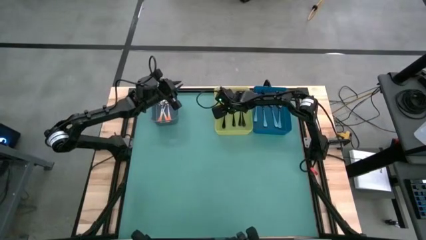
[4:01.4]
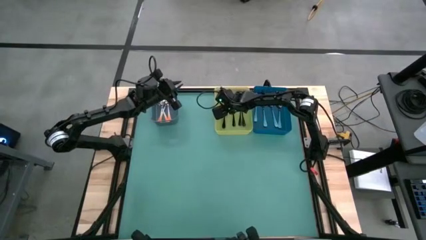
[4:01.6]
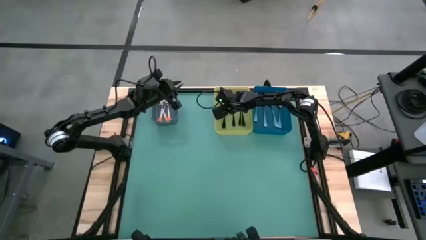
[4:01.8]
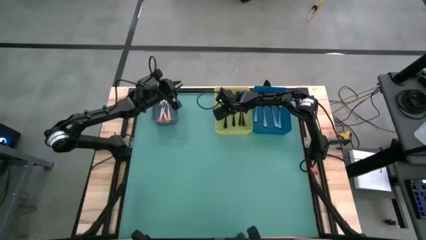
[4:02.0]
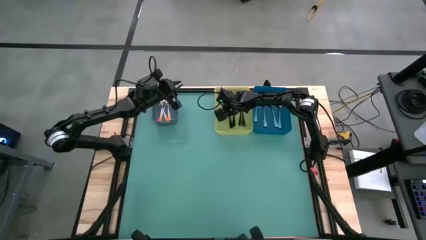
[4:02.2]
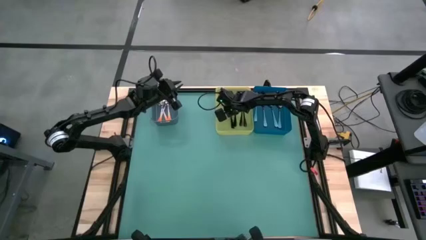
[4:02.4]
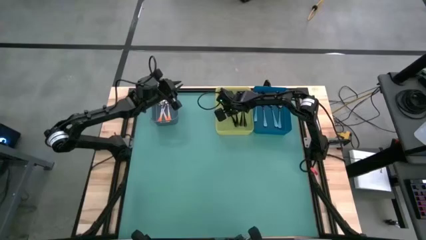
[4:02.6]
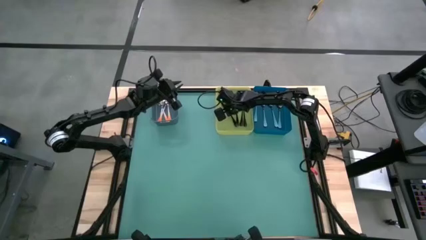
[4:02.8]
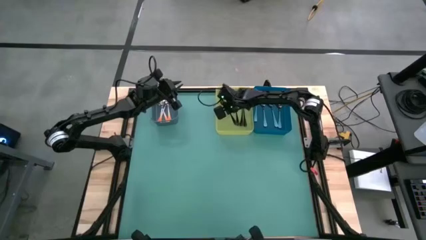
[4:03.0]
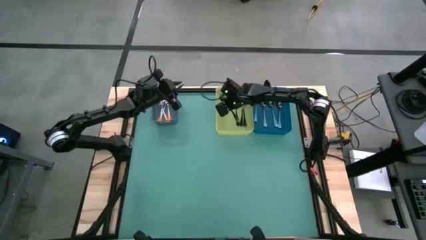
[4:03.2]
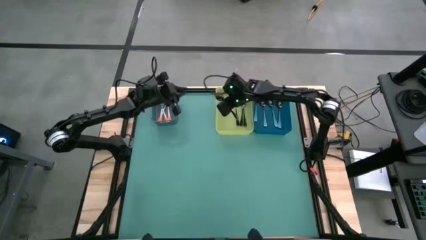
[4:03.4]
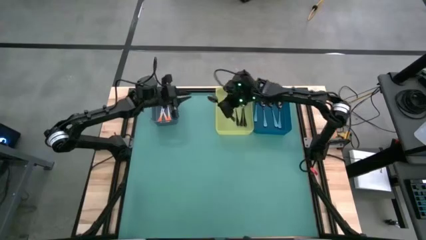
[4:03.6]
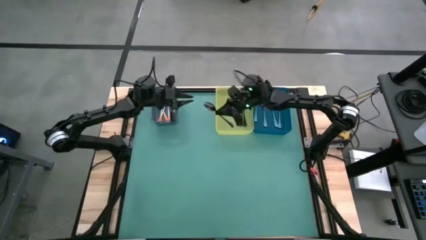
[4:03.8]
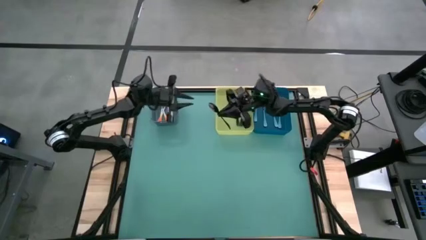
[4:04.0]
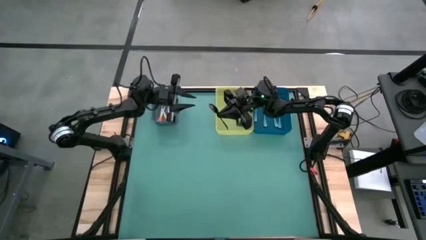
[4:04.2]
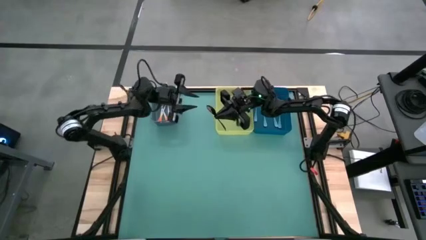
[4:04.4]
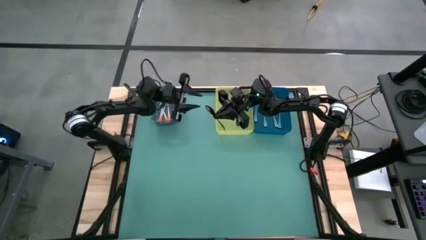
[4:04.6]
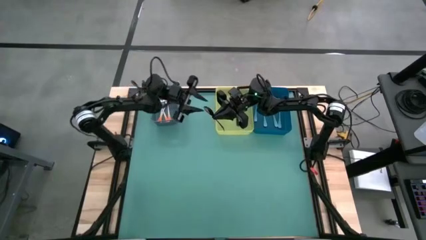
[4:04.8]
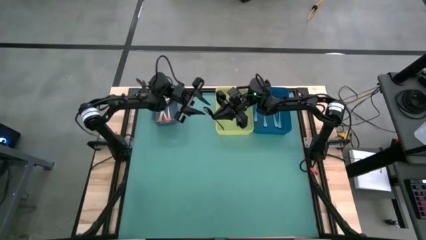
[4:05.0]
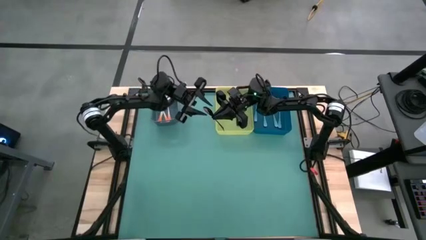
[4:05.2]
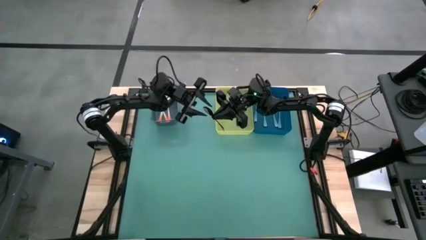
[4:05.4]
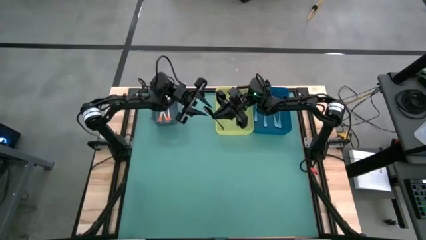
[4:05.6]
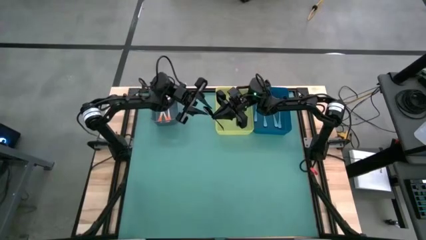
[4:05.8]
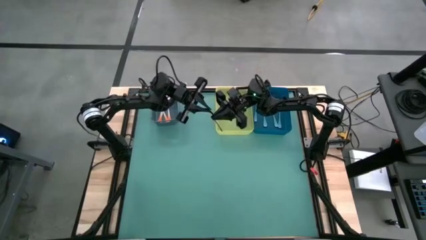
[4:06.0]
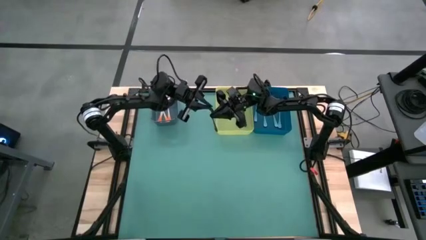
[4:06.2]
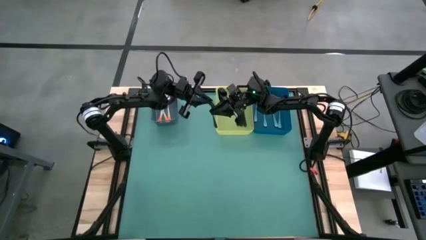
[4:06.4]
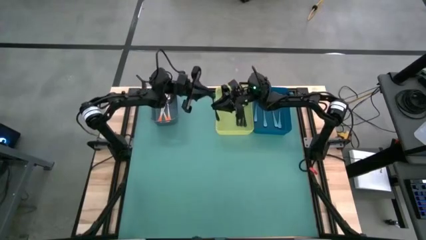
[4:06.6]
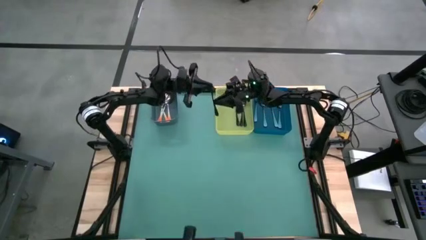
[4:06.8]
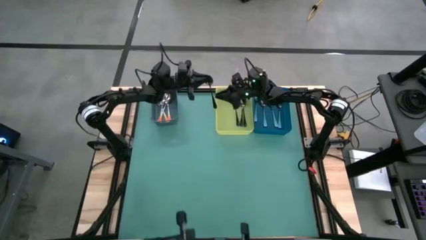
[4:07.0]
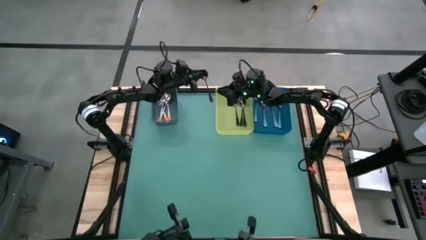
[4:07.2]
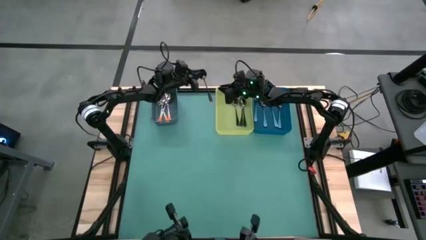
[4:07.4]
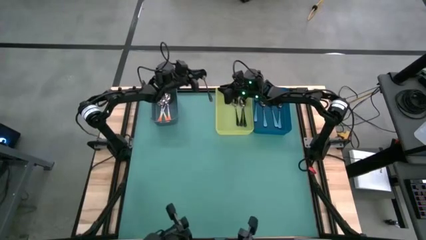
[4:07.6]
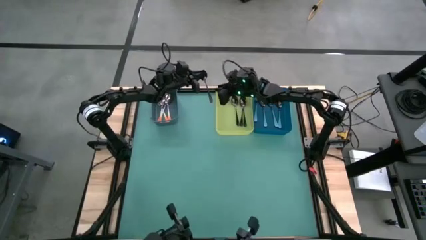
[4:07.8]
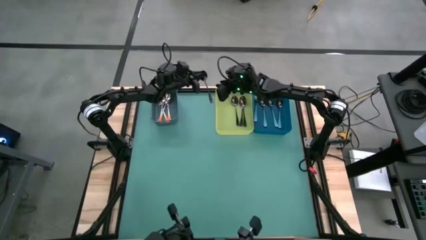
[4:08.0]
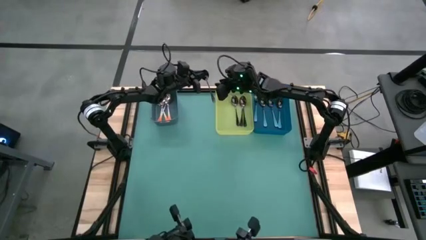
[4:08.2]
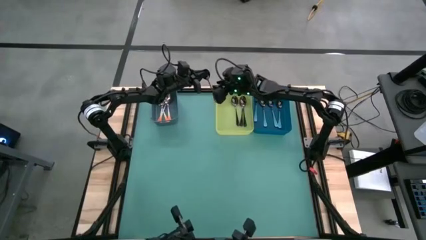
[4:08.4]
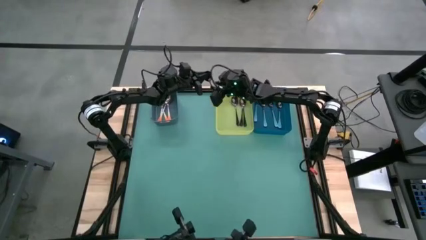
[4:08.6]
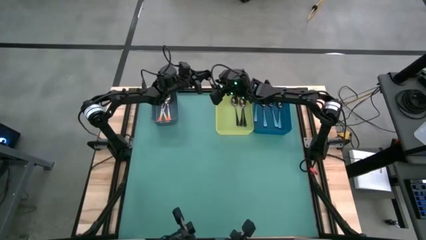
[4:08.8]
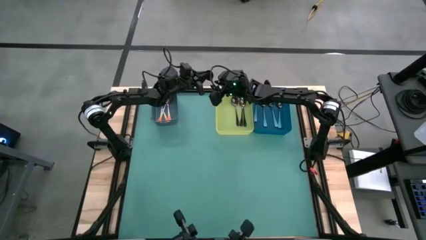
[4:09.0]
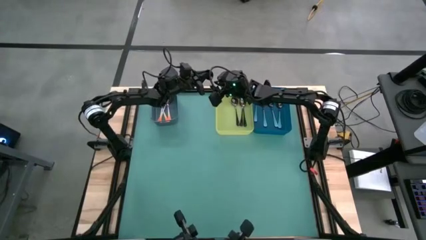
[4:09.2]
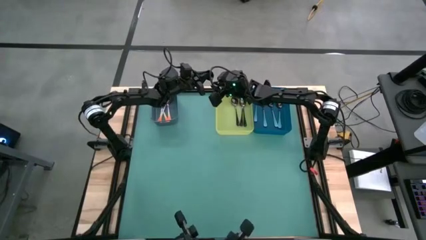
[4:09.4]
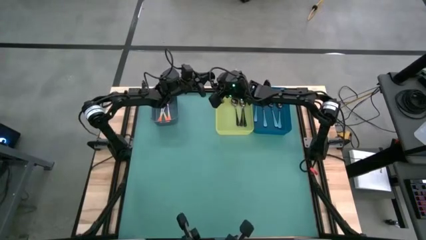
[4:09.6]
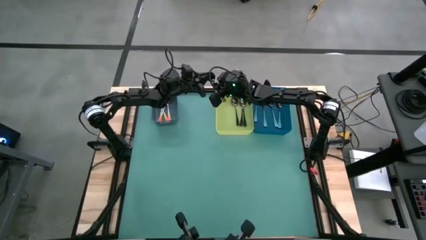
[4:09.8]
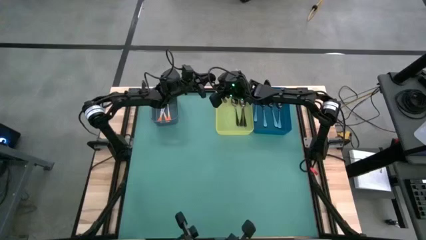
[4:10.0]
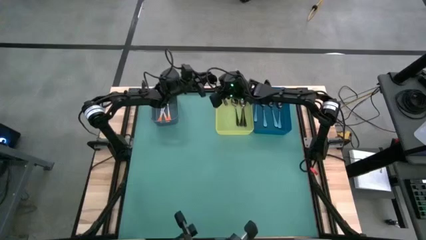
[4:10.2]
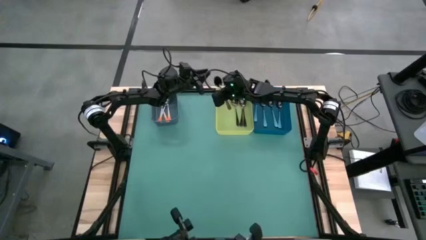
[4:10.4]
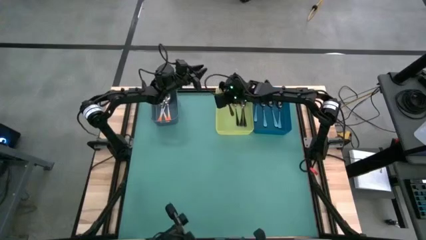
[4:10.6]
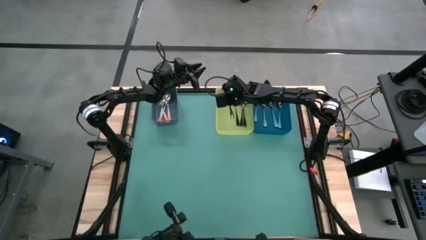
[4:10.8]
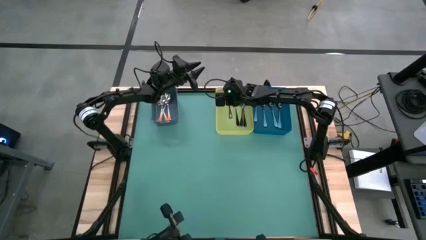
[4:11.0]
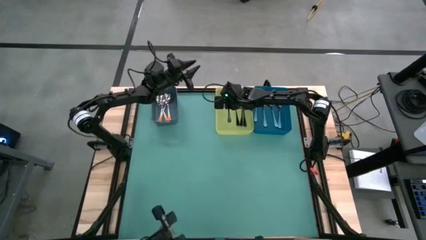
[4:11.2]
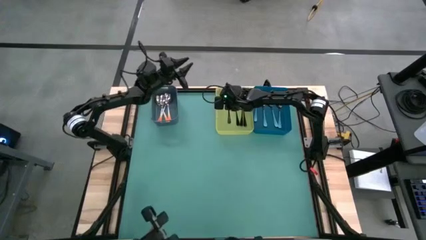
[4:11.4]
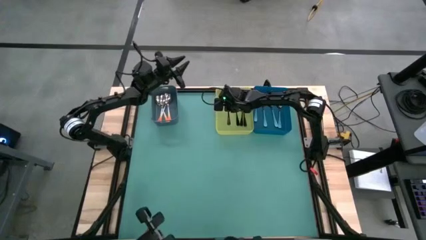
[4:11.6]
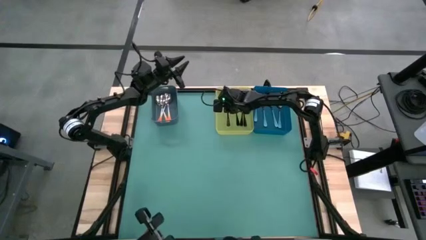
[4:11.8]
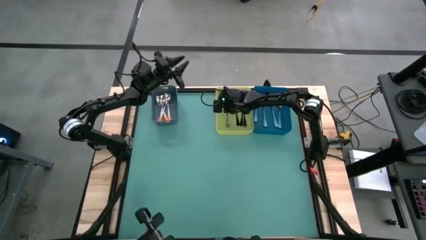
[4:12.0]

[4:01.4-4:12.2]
Task: Sort silverware by color (type)
Adjust the black spoon on the yellow bin

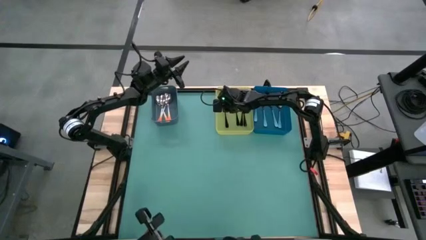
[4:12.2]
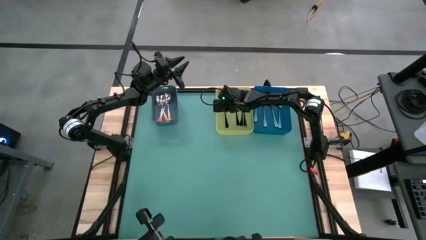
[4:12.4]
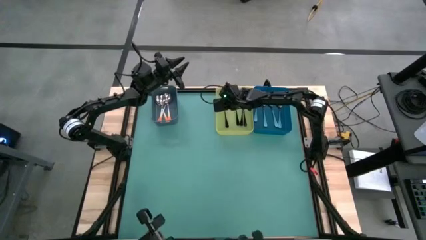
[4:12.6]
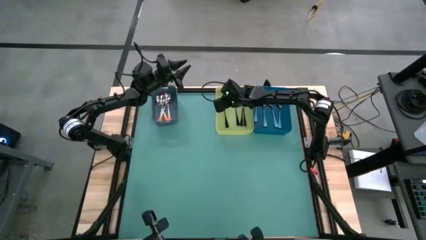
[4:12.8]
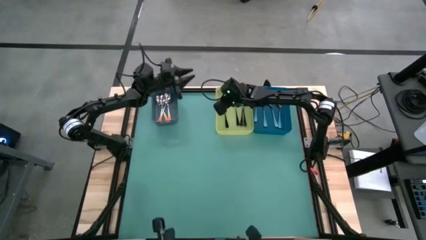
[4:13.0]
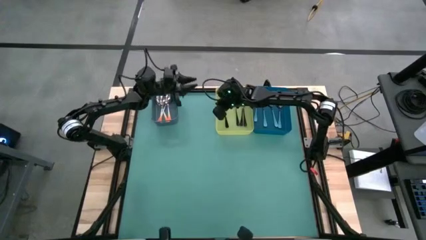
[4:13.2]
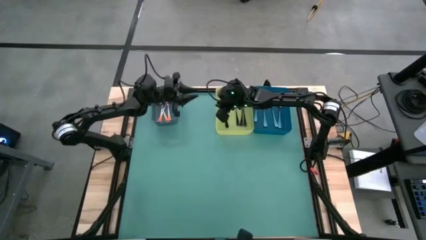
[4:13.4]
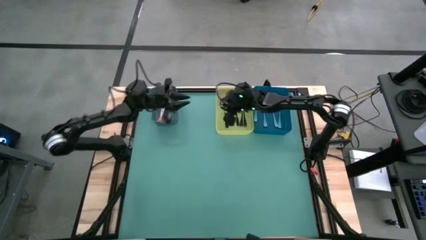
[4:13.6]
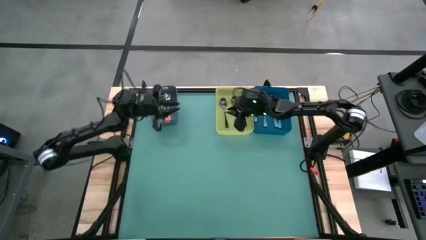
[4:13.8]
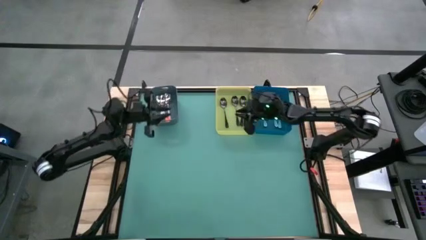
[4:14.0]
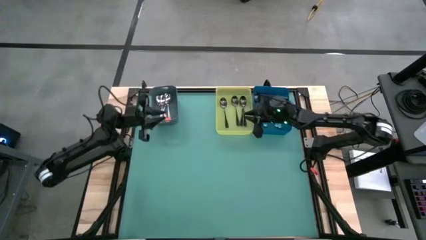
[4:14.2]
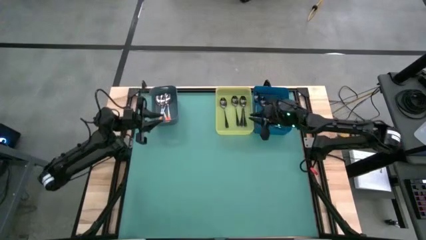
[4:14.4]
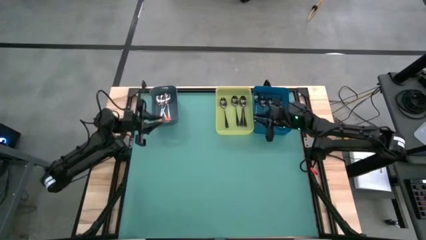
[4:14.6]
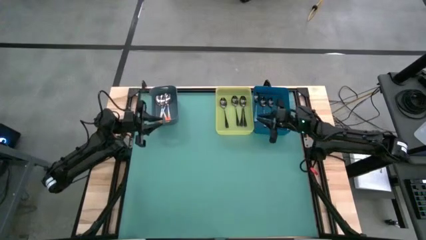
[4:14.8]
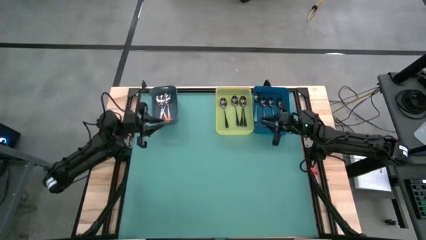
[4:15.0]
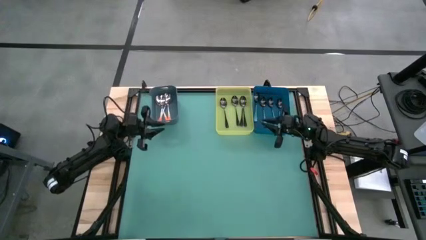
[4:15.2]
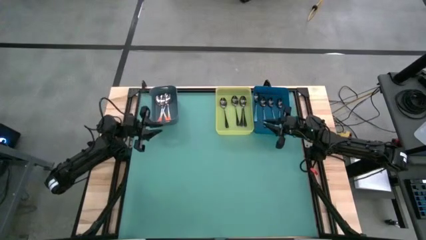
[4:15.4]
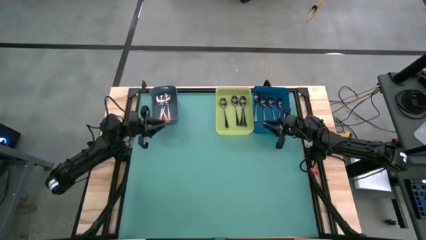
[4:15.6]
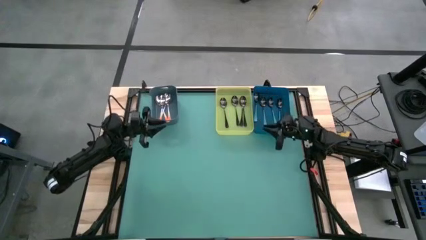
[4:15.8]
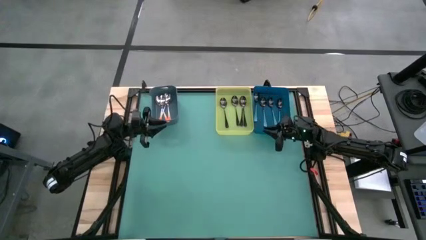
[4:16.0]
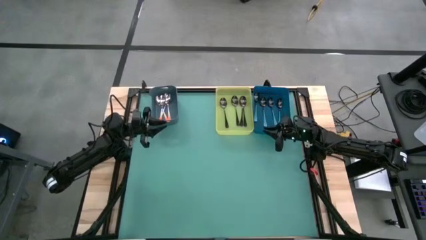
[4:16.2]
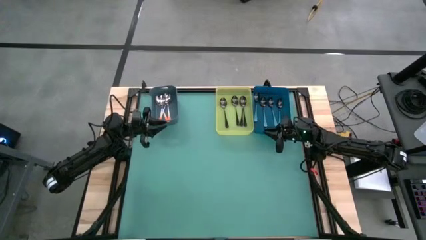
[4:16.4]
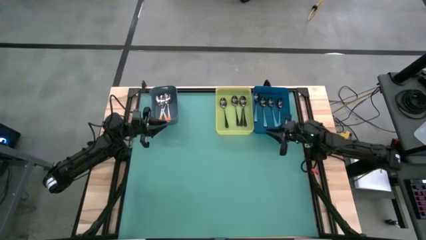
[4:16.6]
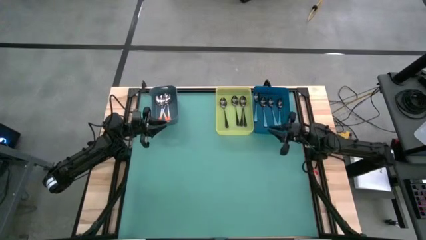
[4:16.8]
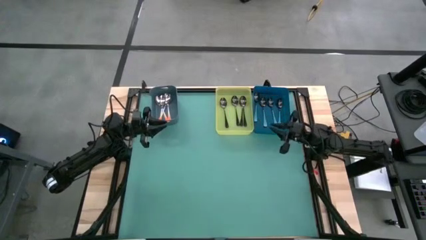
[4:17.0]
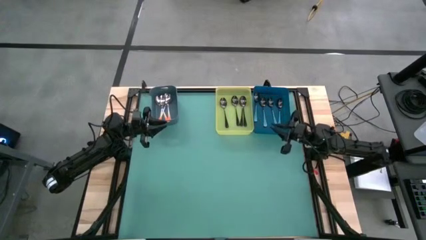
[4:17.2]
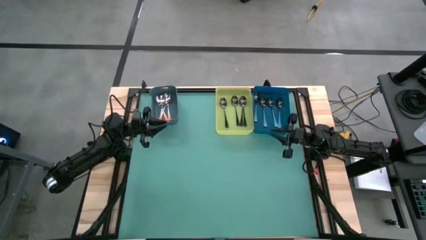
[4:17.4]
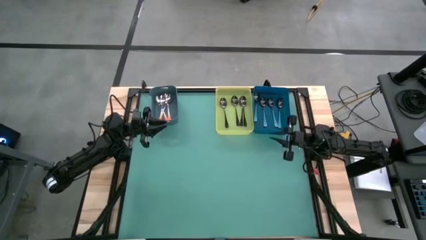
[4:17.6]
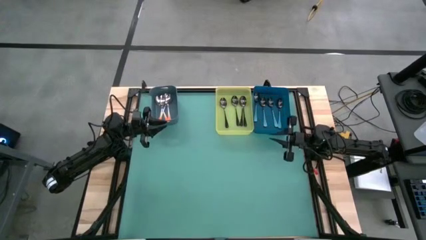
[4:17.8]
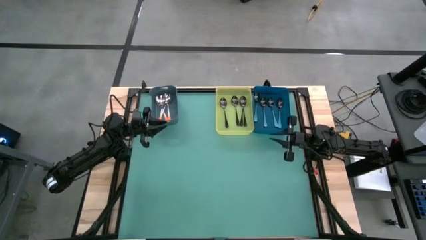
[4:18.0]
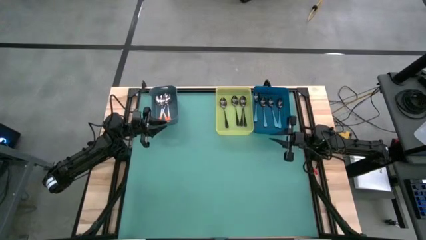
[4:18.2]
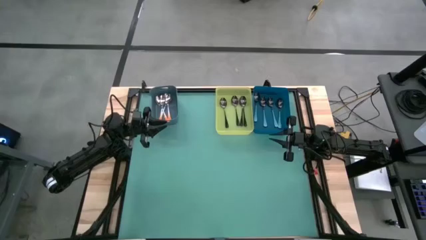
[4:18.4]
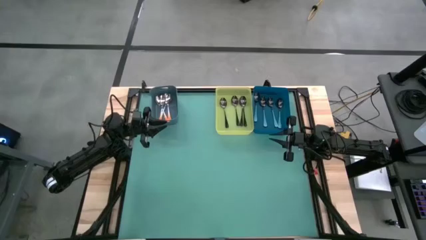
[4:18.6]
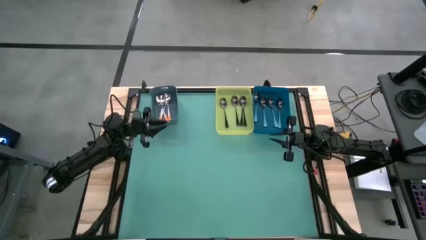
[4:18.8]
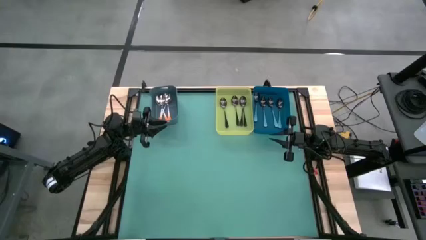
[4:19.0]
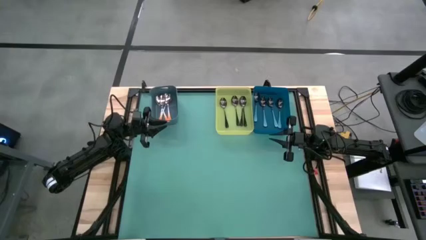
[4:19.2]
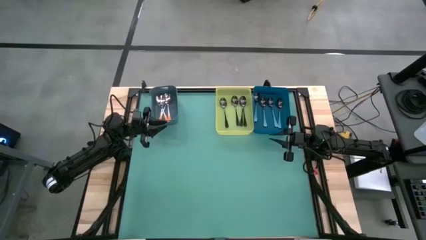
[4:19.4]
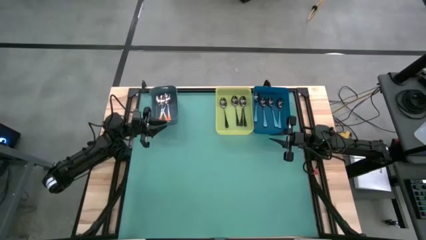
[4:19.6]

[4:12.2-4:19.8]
Return to Home Position
